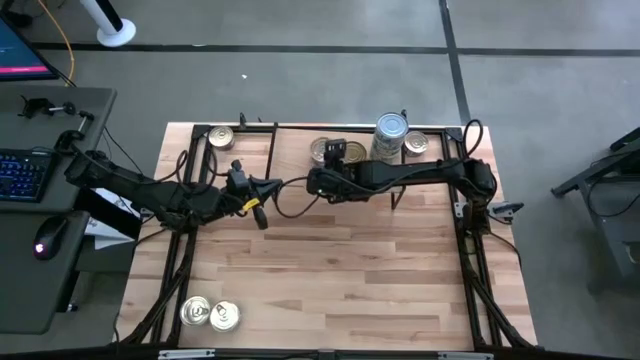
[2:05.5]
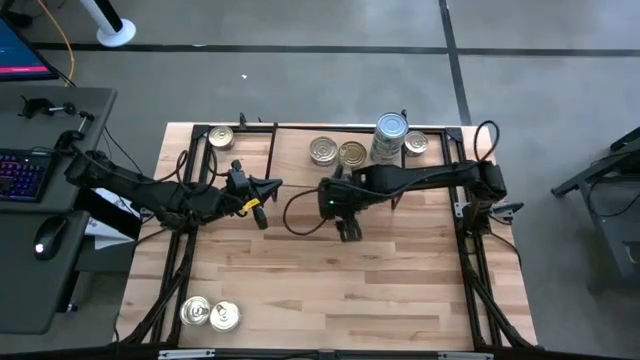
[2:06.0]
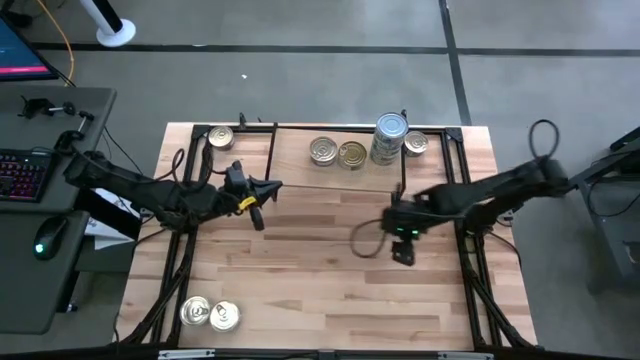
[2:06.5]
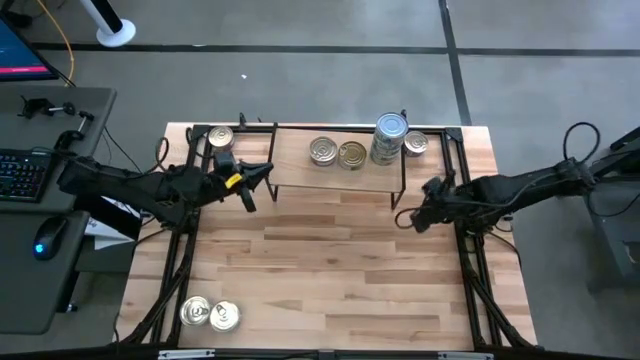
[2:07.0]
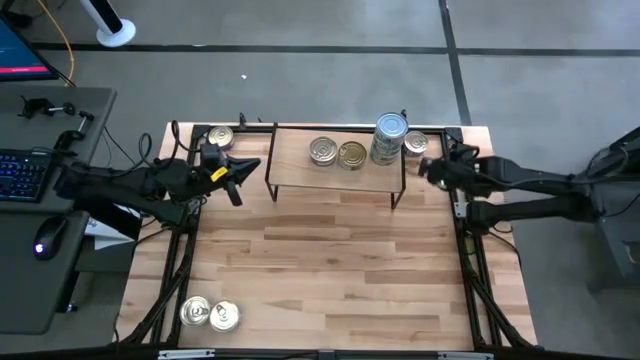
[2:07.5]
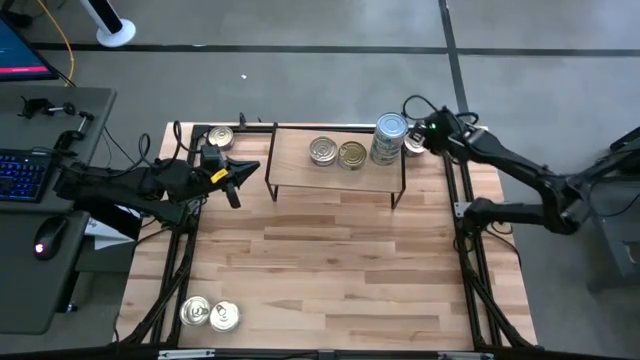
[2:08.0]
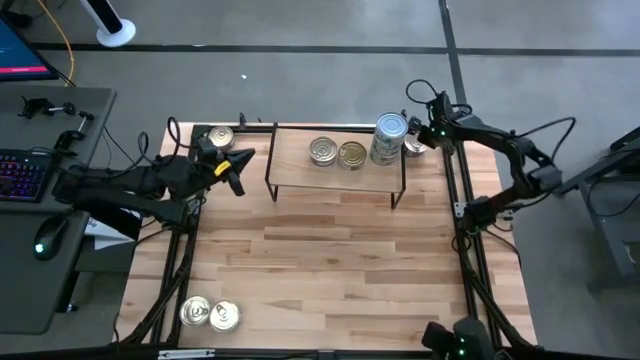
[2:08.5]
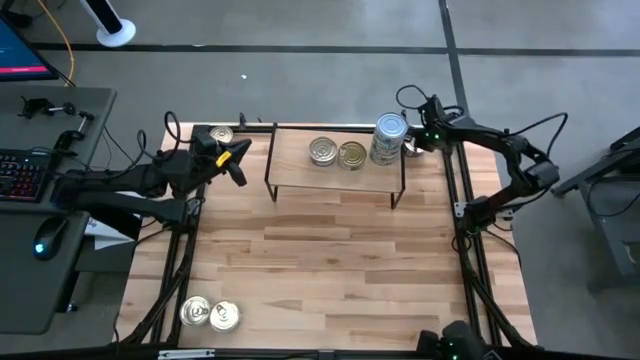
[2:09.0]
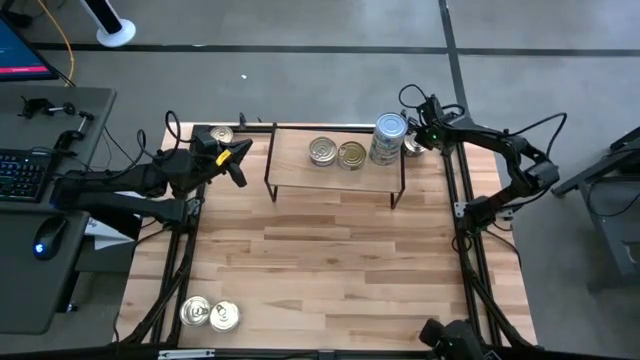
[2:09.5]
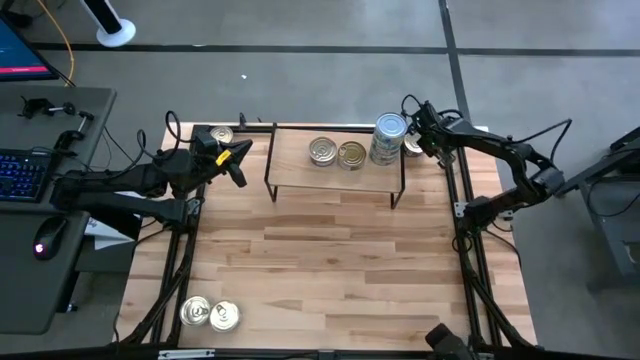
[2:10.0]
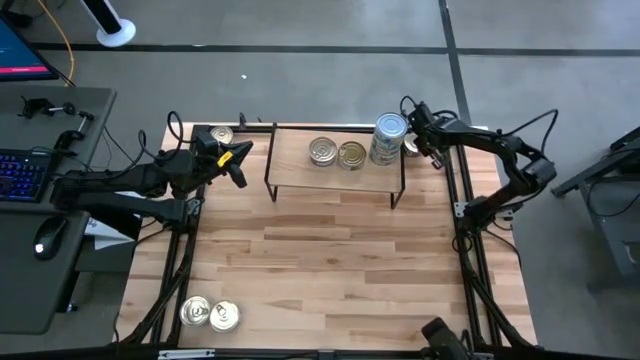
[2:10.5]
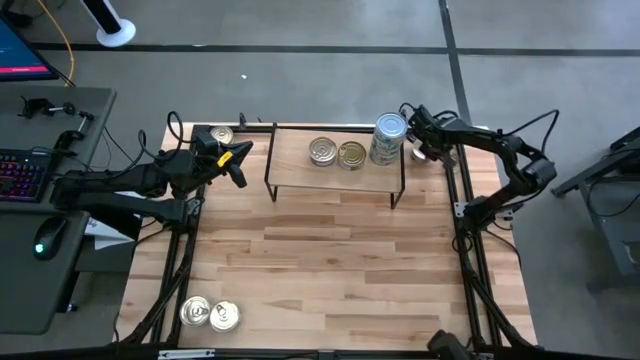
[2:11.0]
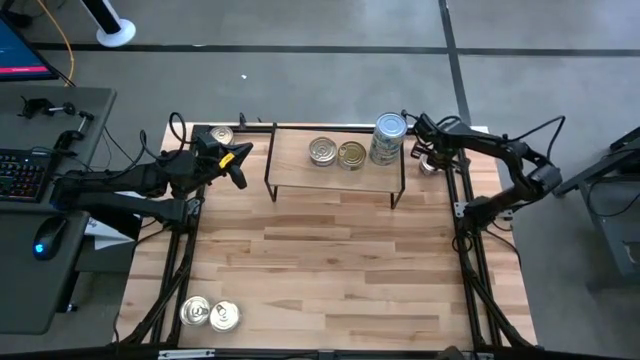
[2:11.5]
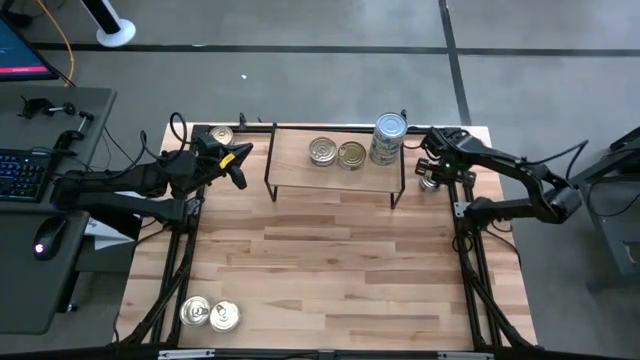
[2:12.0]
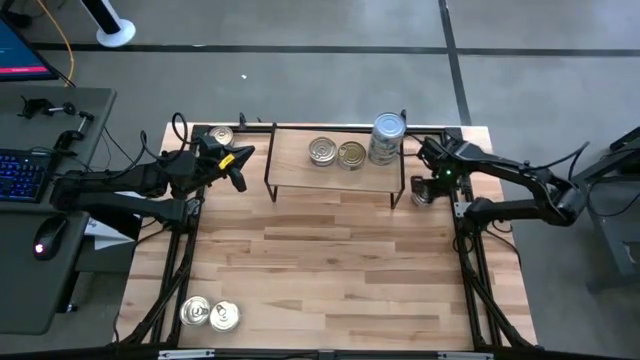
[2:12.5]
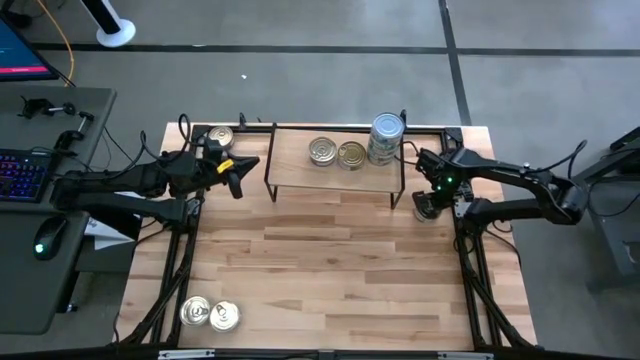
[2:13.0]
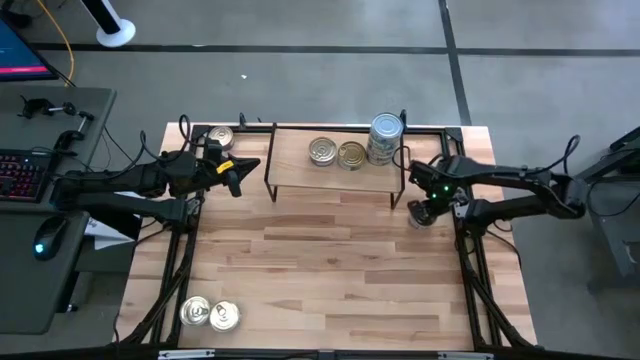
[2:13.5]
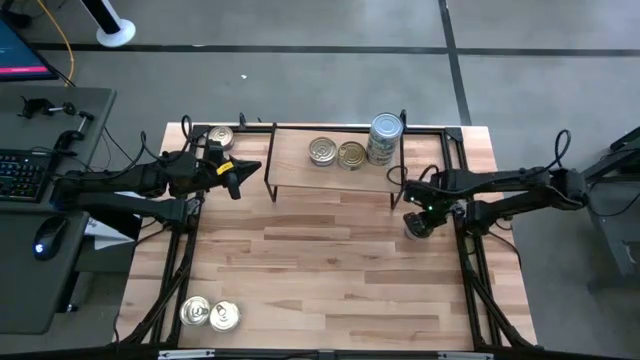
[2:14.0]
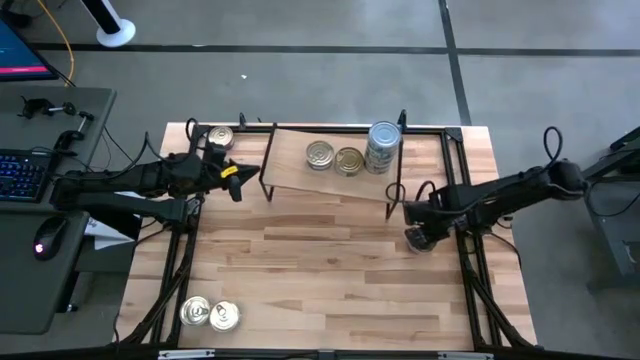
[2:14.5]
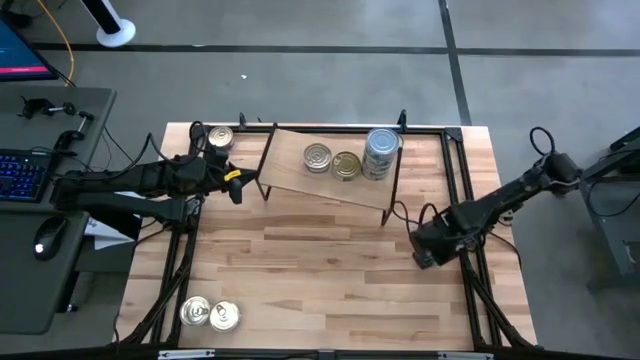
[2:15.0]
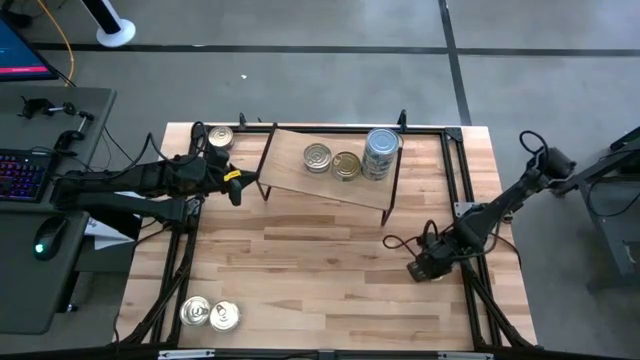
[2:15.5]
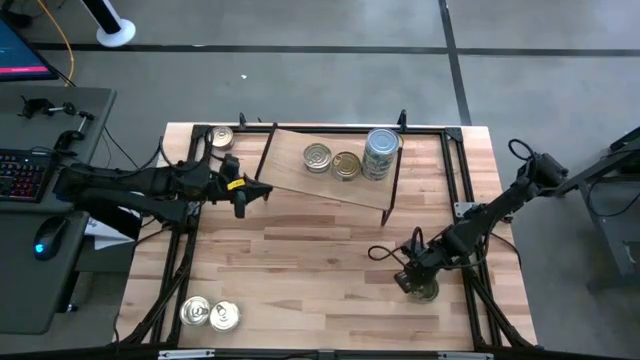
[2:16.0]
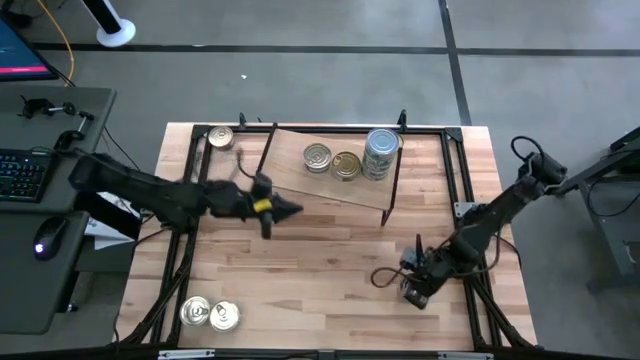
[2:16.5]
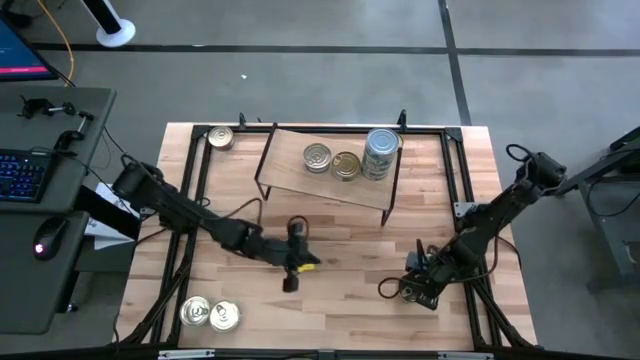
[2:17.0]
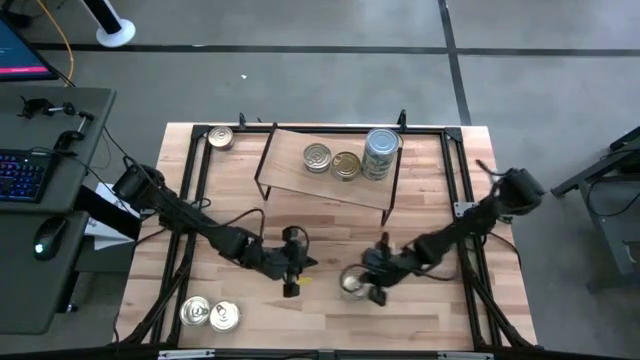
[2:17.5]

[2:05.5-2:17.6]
Task: Stack canned seafood by type on shelf
Stack the blue pink tuna can on top of the other blue pink tuna can on the shelf

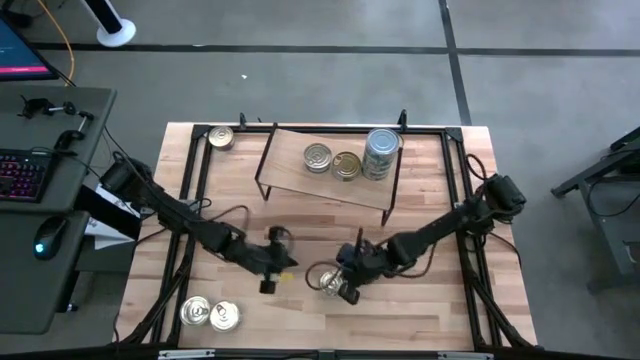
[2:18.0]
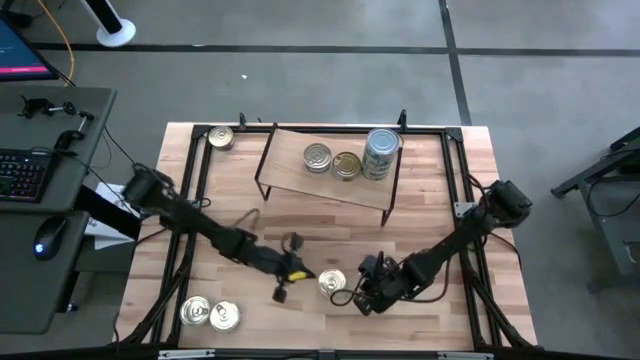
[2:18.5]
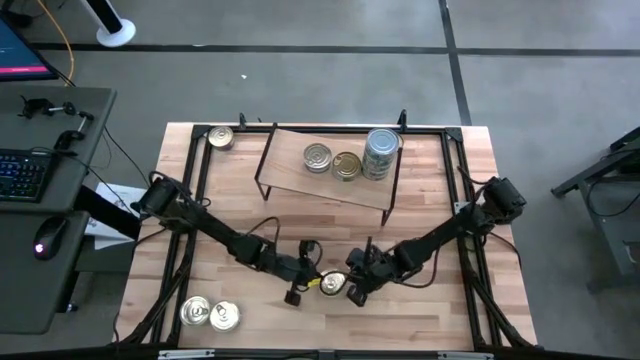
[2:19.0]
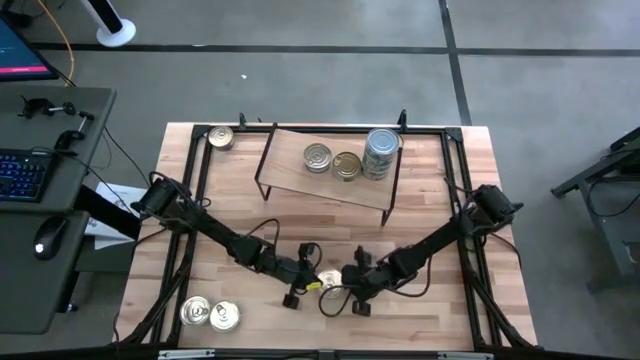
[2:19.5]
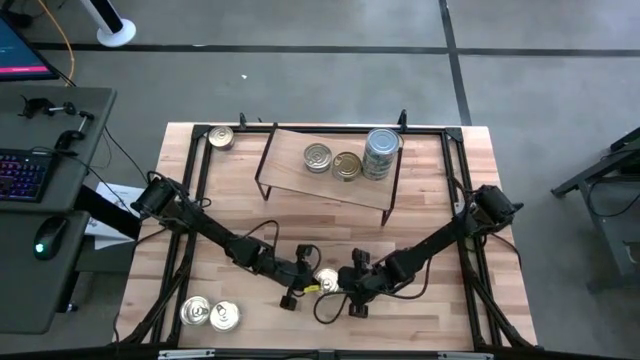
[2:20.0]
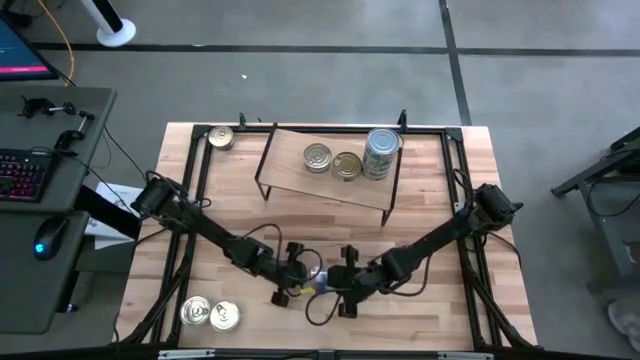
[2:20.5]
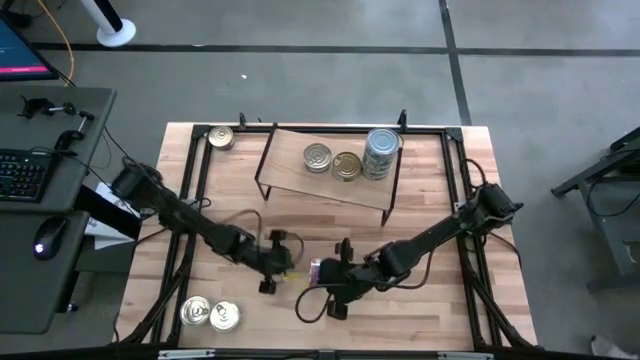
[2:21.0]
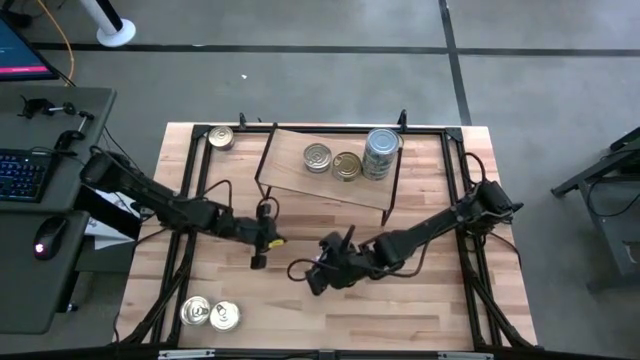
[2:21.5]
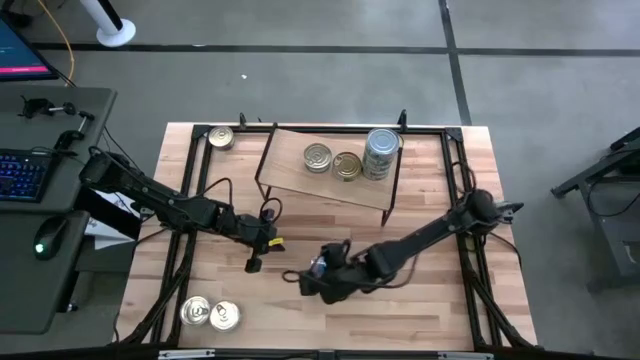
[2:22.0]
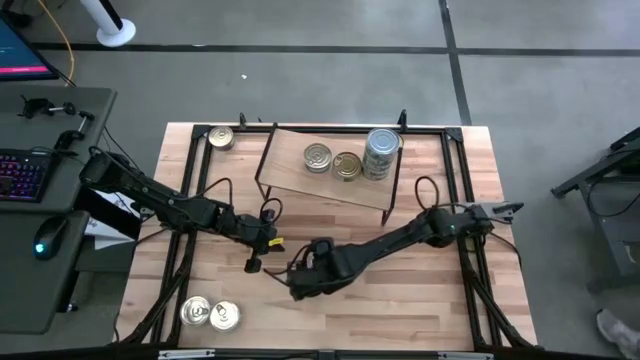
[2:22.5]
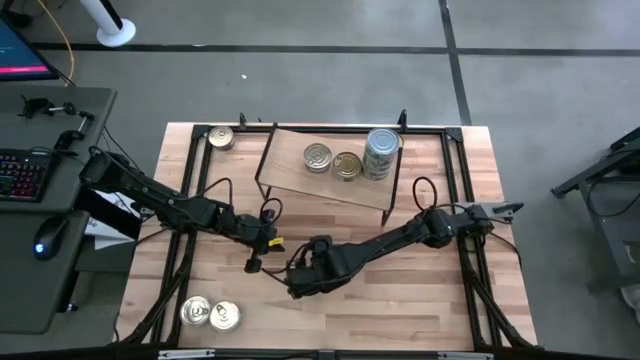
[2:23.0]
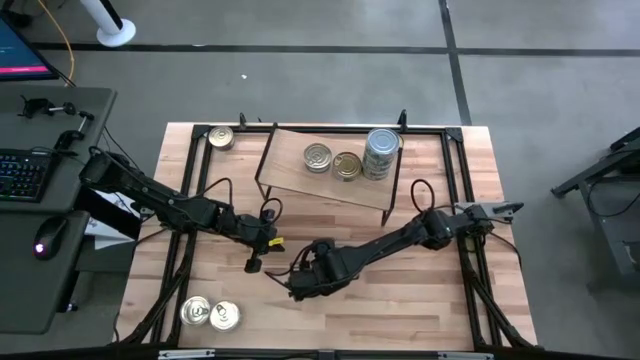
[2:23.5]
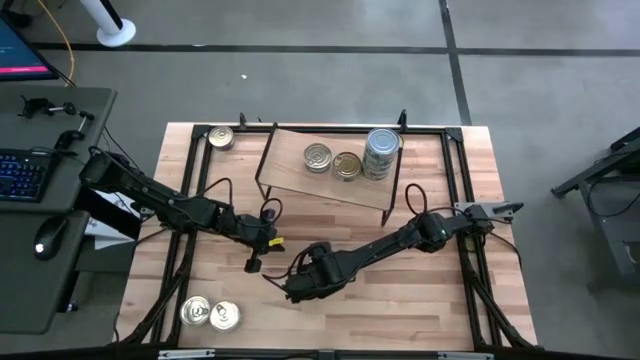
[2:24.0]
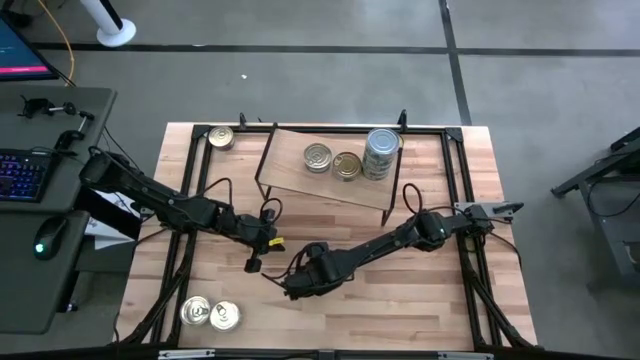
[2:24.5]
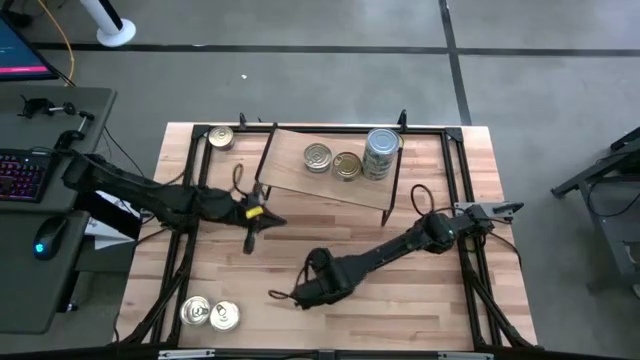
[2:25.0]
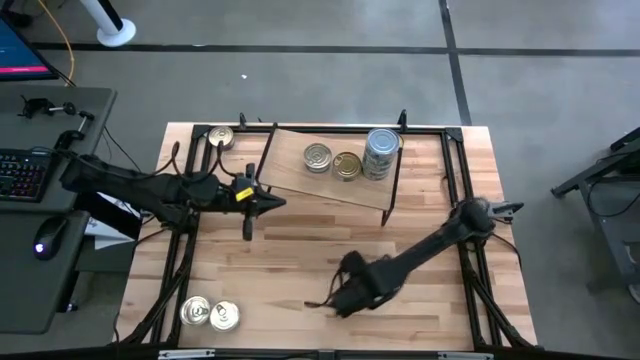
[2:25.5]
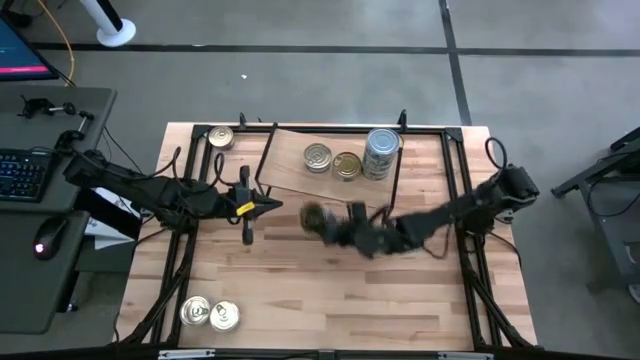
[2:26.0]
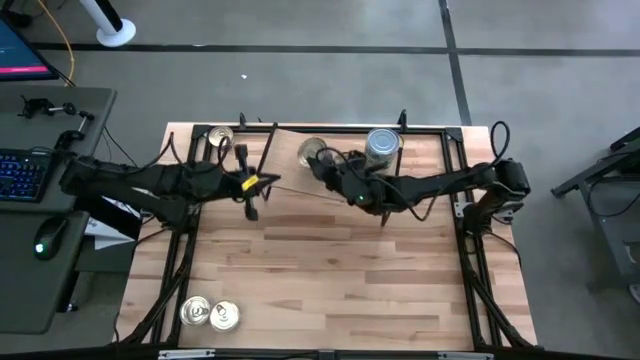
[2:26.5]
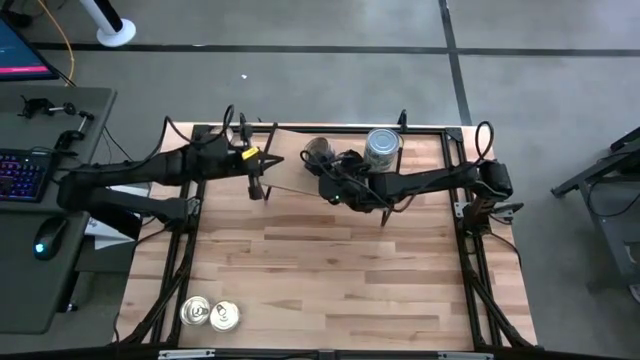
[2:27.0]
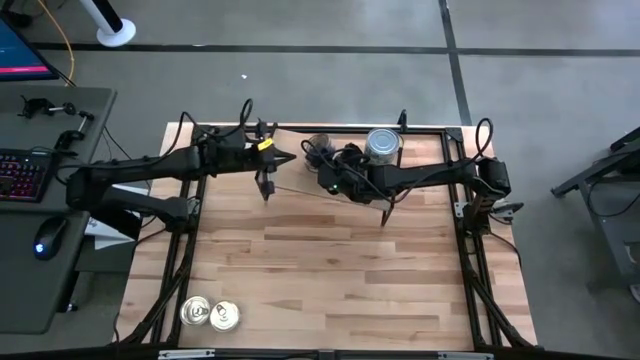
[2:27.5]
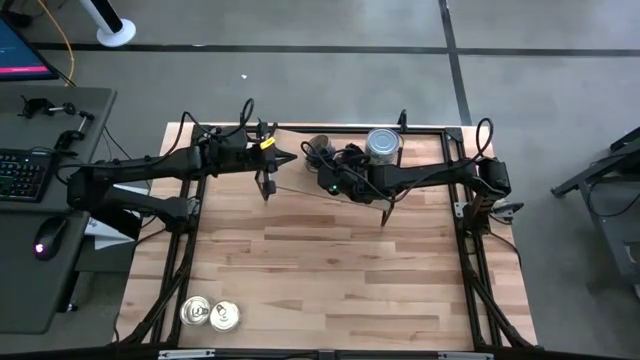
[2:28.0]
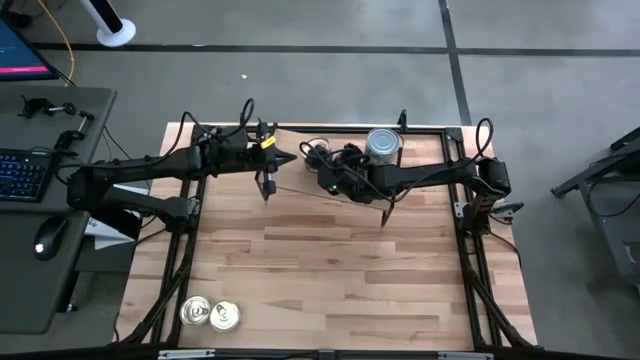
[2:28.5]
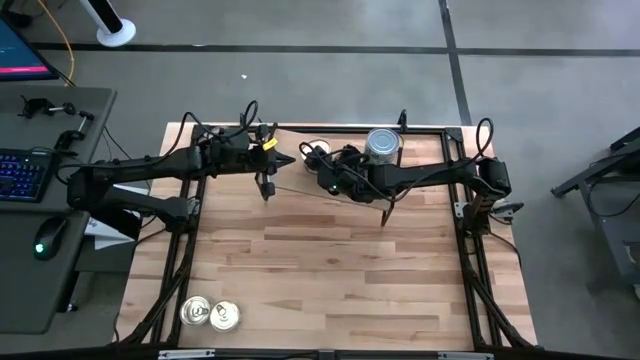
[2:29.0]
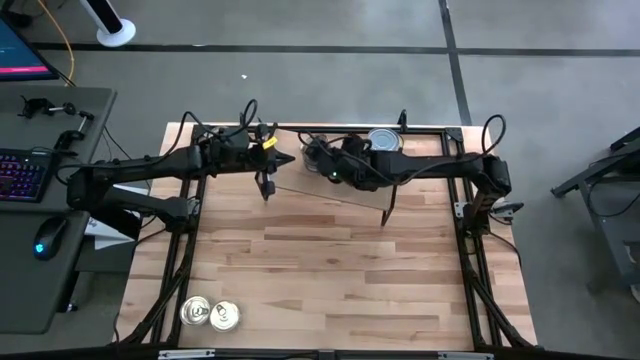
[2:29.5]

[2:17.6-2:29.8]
Stack the blue pink tuna can on top of the other blue pink tuna can on the shelf
